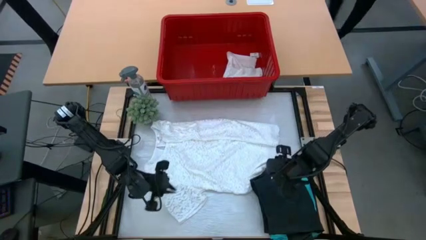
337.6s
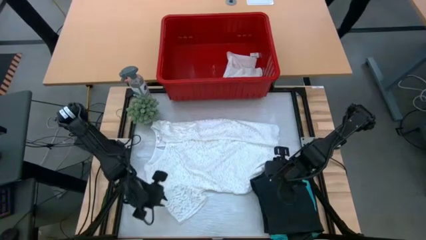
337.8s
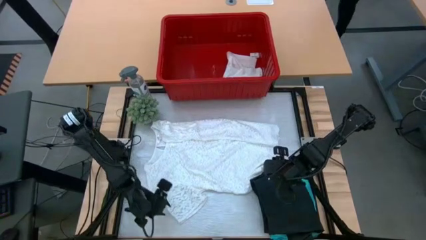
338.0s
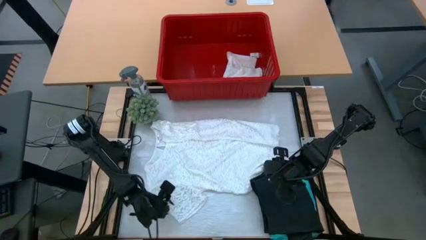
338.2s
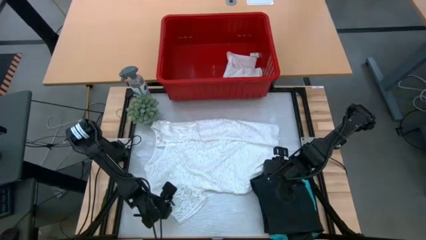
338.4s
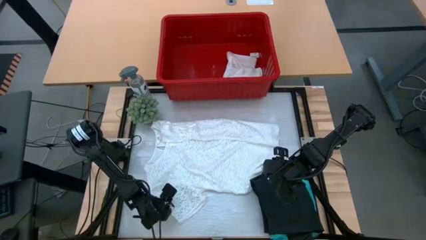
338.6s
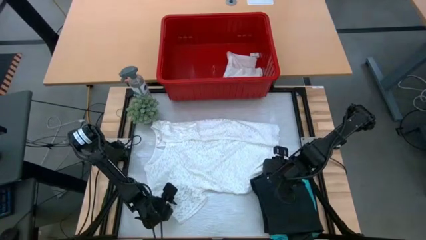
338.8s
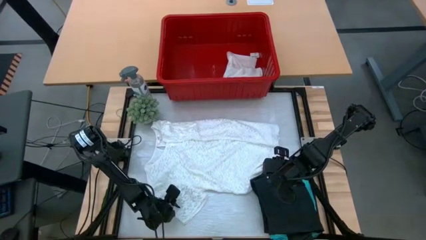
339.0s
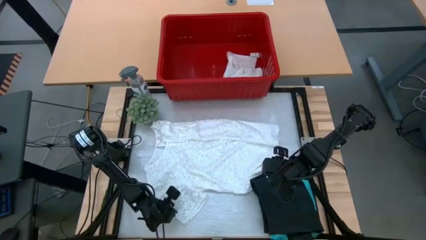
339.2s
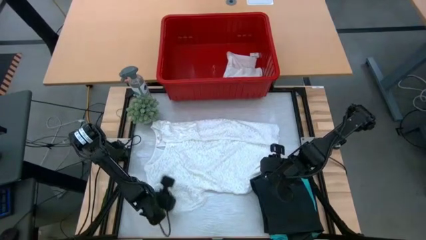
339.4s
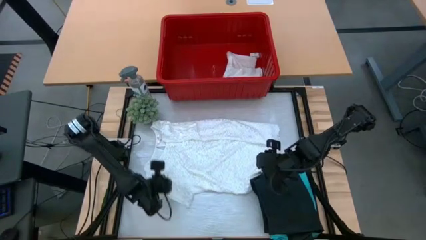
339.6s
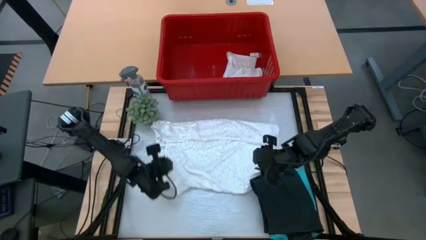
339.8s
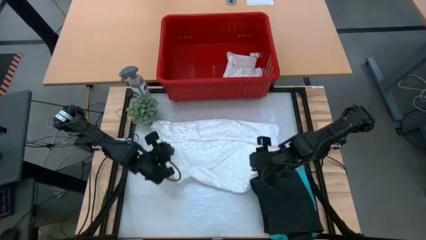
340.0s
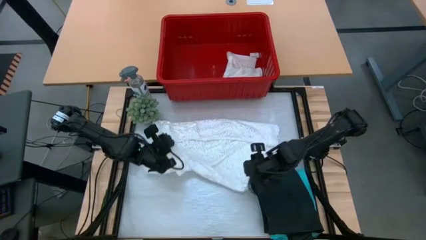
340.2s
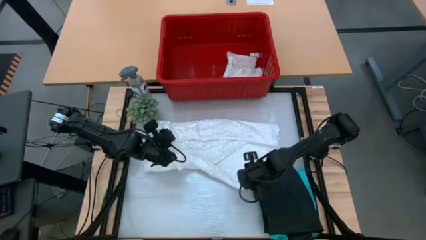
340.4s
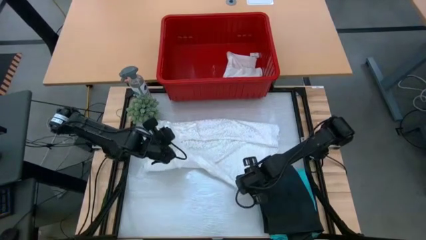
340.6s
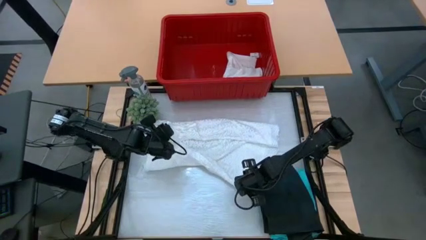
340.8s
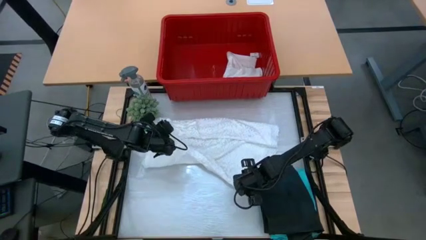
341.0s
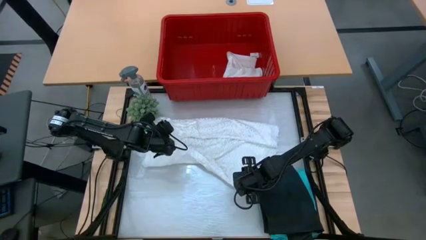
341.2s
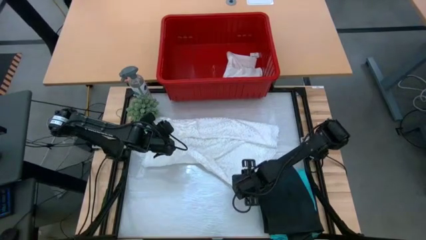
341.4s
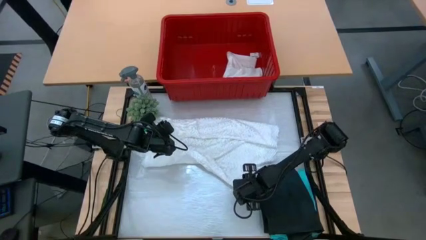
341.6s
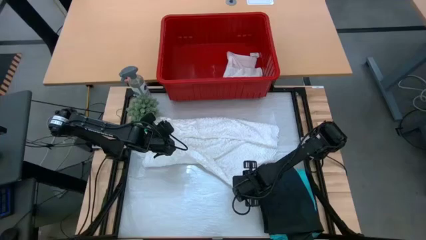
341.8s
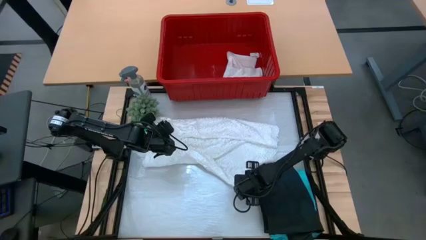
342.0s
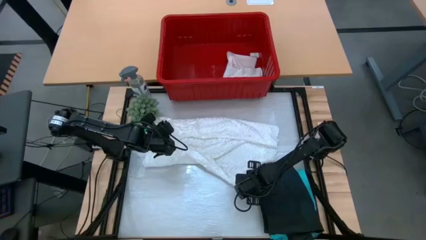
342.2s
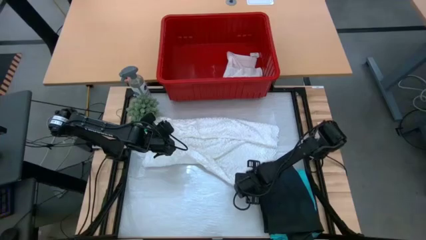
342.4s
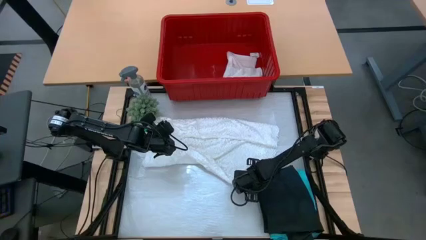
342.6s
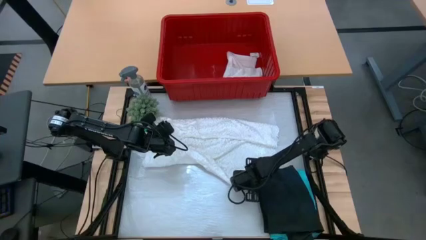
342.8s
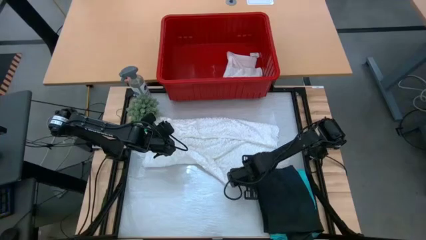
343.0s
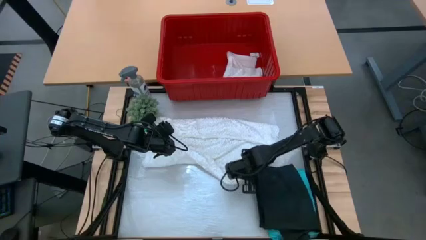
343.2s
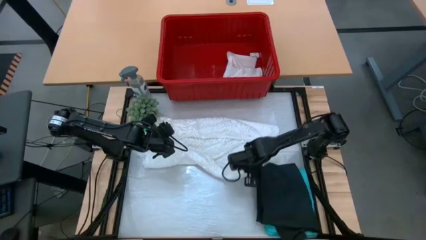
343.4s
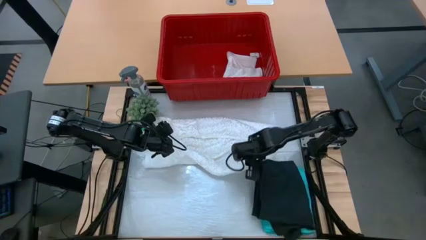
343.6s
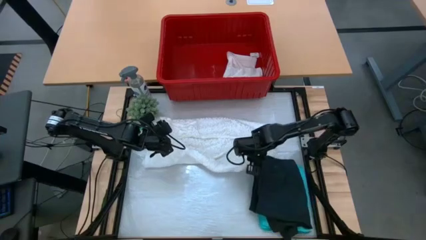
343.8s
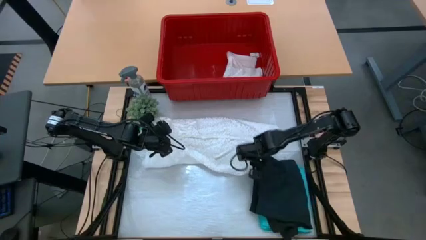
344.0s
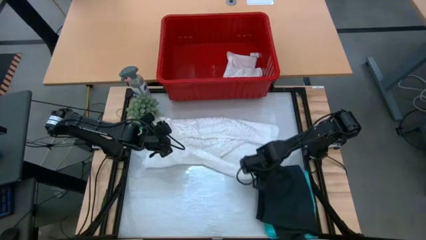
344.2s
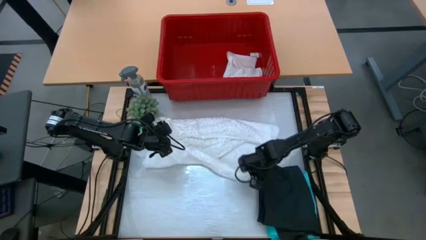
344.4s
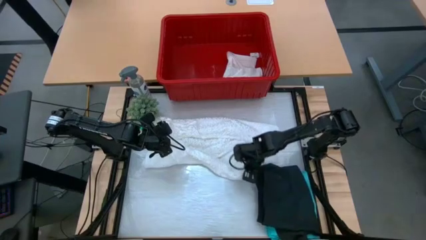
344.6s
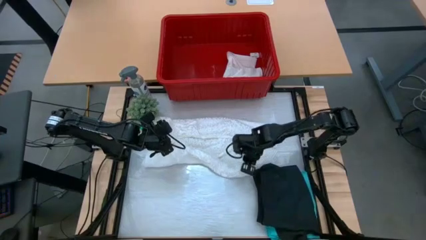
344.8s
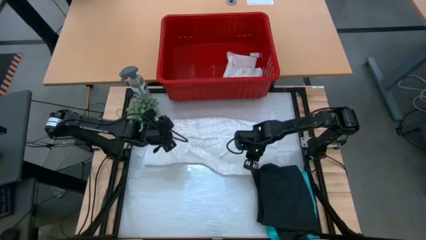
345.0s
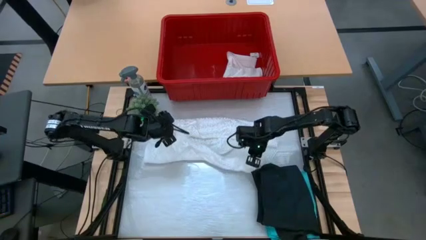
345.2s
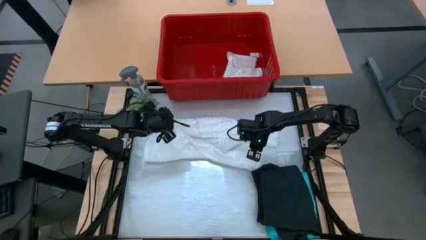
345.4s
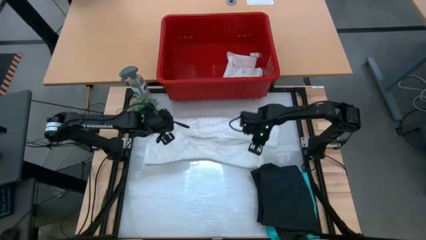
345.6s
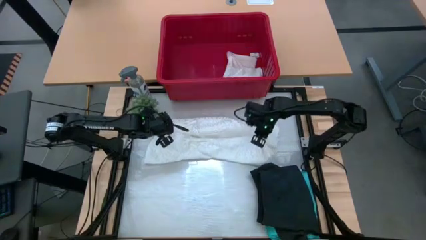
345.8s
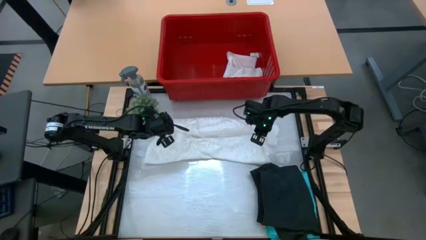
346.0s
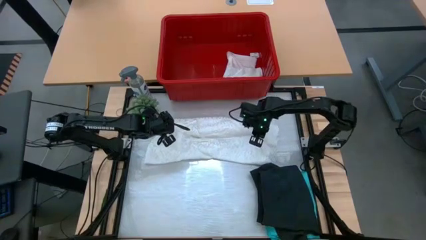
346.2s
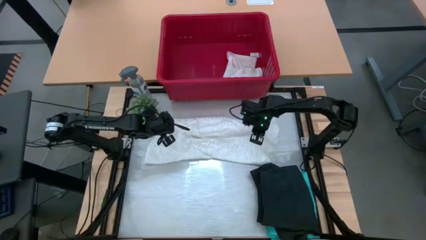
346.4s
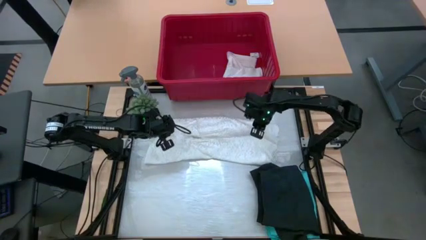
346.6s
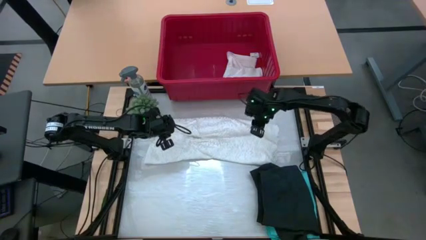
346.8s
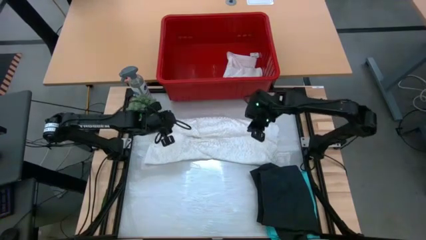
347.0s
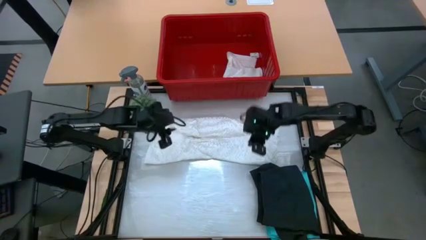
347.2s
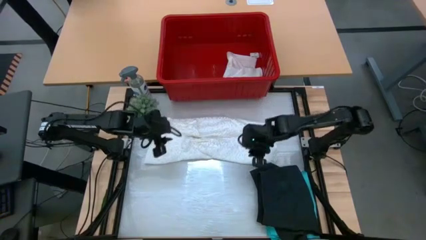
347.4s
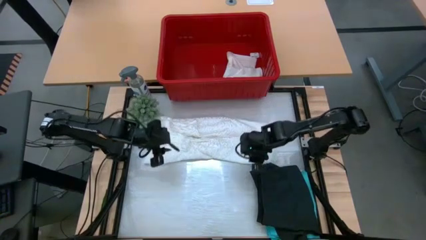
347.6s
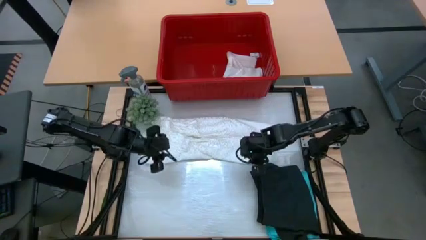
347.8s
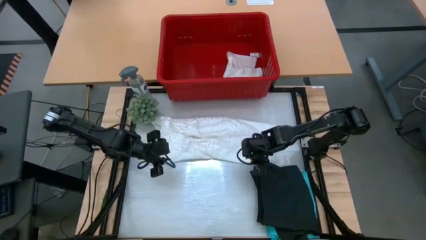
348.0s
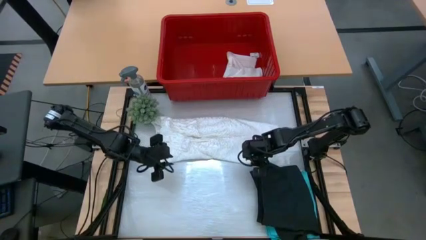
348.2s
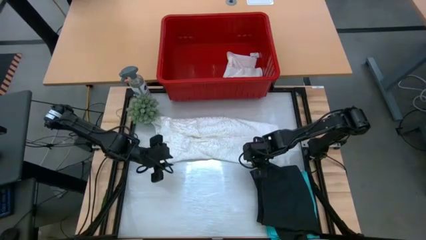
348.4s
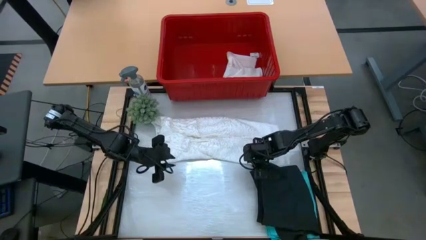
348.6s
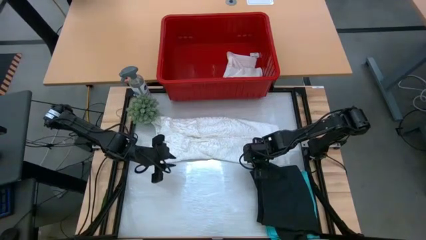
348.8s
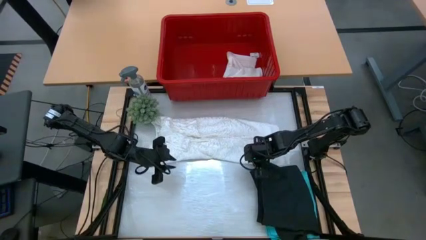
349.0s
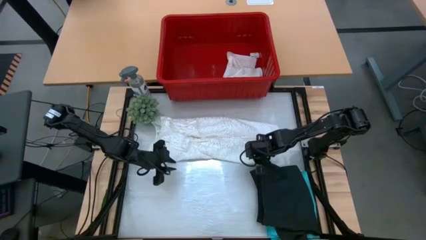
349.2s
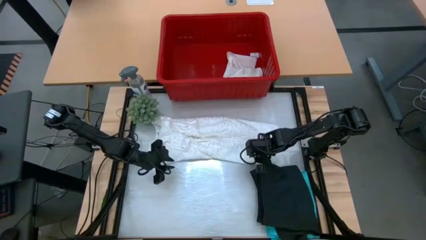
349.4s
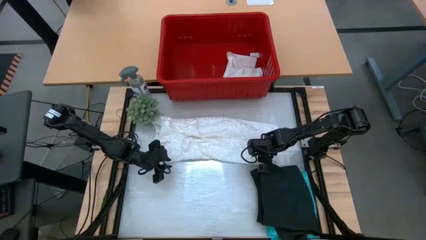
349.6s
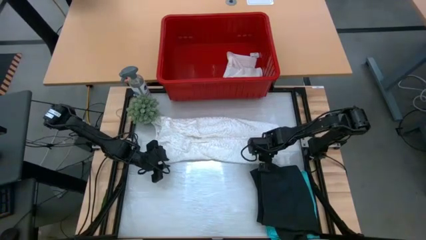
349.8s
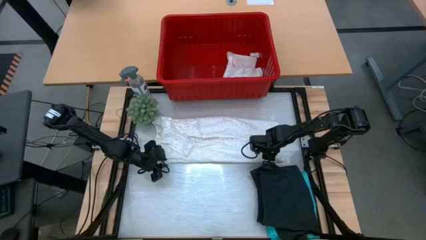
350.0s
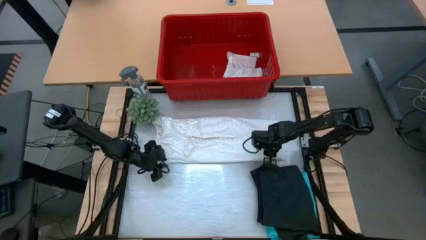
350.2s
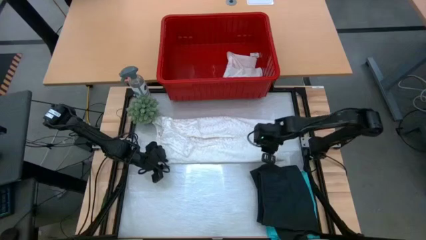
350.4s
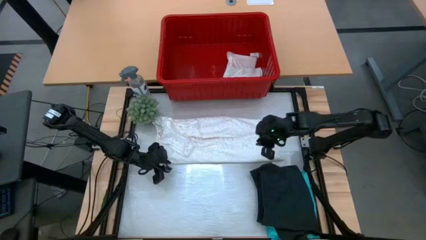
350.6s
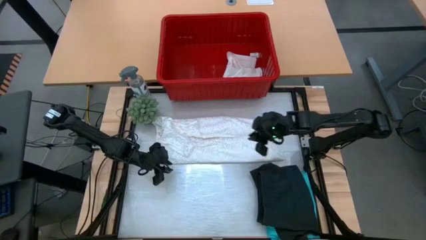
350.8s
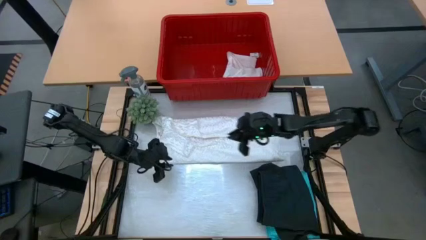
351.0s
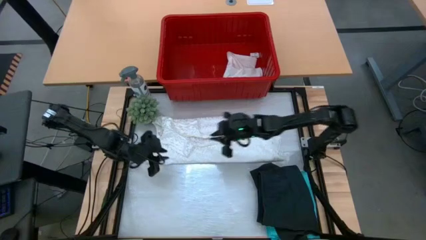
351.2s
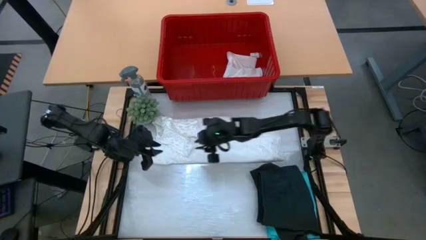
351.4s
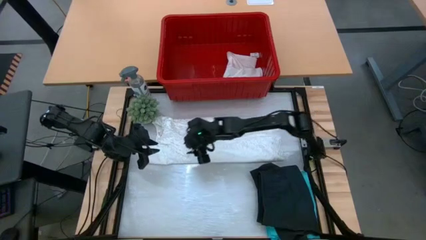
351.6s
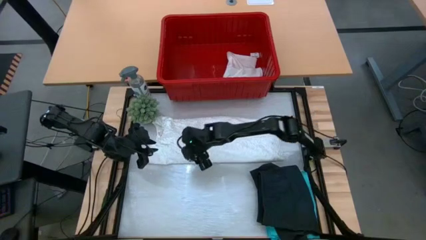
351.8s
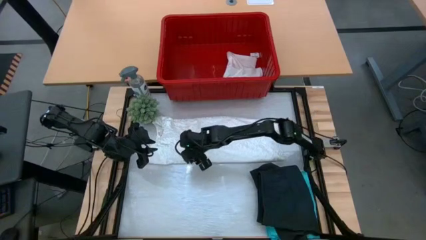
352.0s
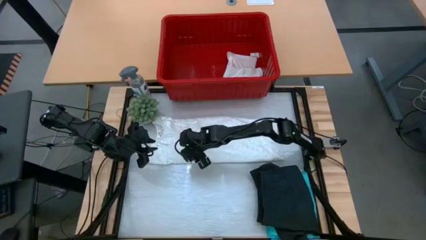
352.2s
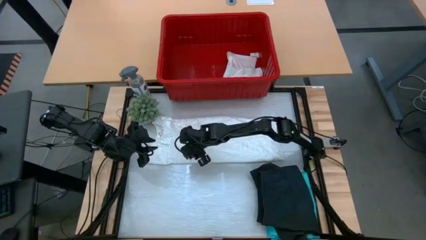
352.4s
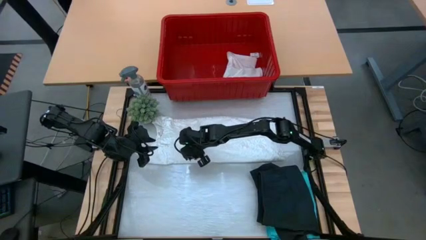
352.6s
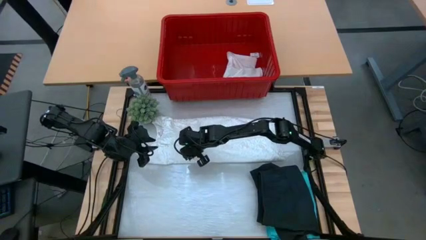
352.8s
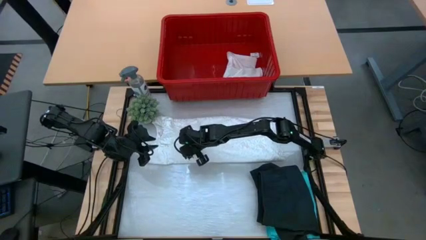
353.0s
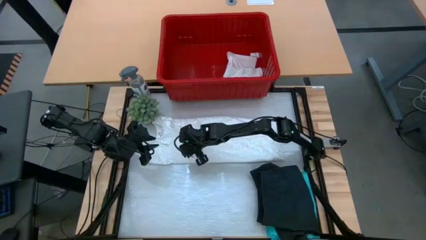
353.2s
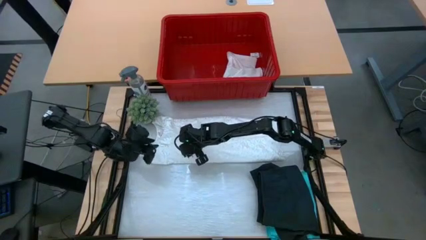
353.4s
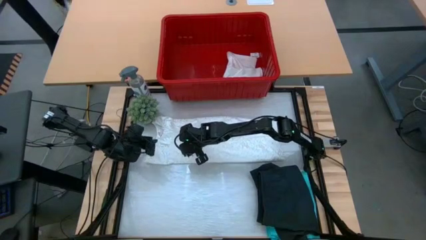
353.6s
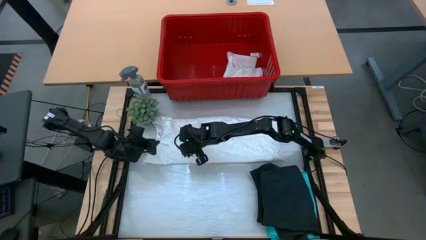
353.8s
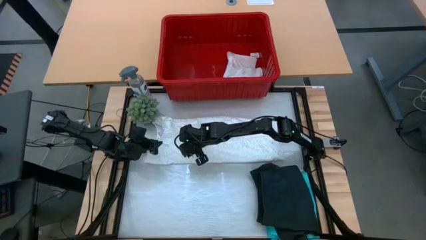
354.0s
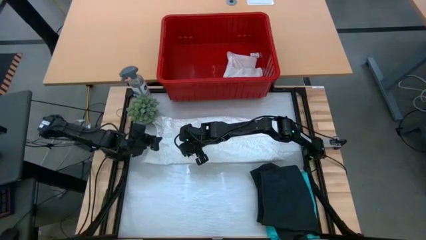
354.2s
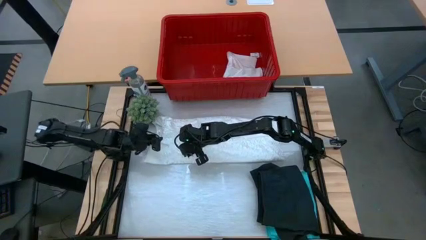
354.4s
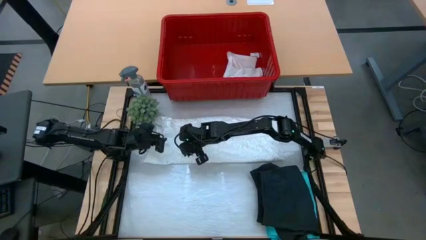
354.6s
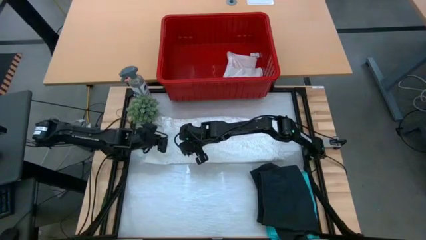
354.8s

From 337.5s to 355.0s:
Task: Fold Laundry from Bin
Fold the white t-shirt
